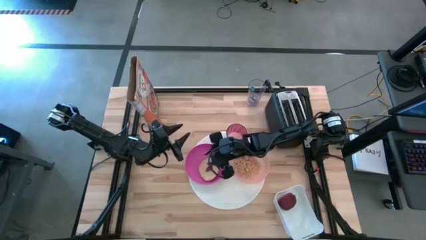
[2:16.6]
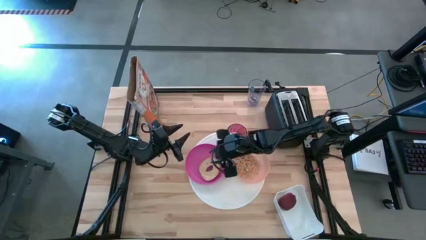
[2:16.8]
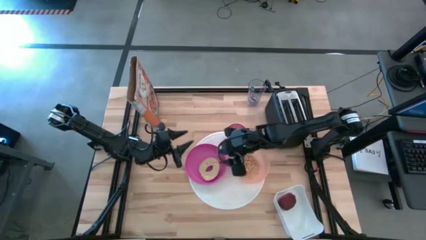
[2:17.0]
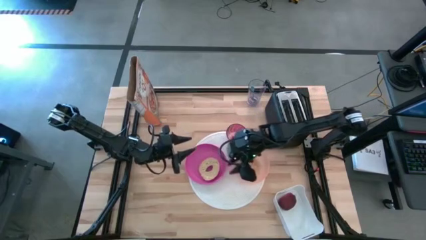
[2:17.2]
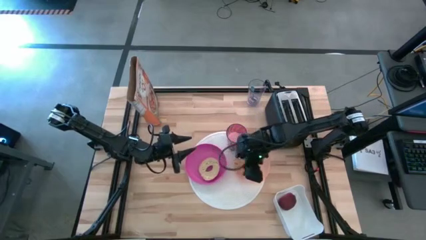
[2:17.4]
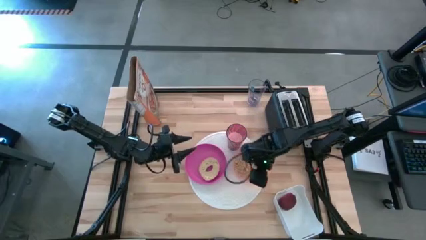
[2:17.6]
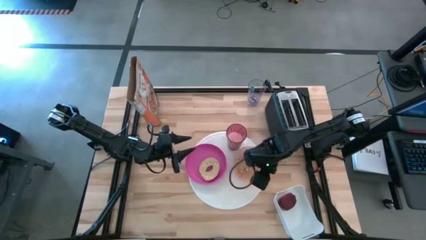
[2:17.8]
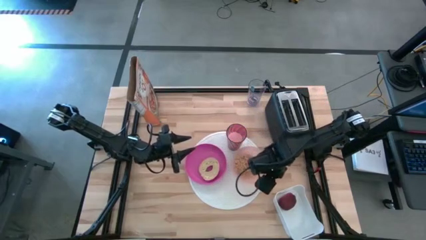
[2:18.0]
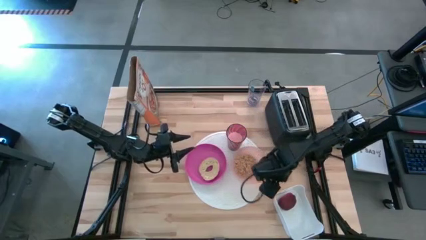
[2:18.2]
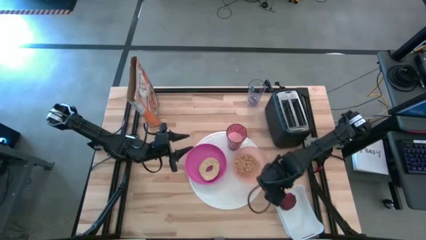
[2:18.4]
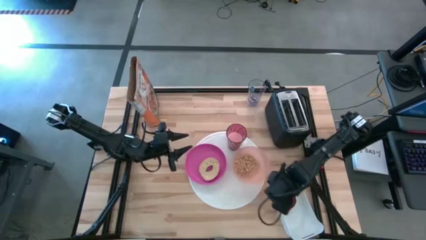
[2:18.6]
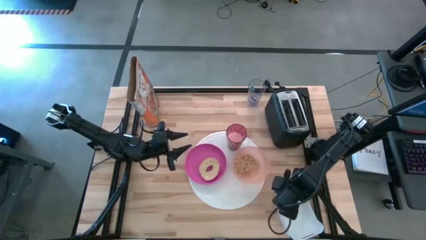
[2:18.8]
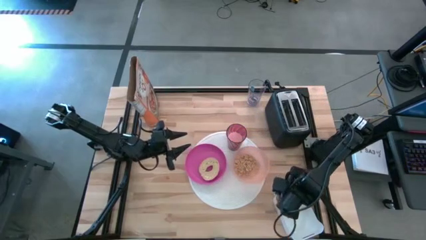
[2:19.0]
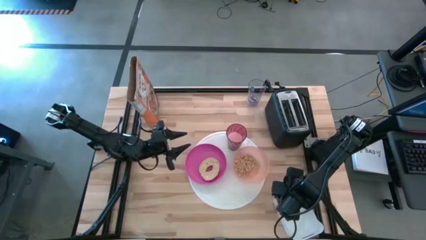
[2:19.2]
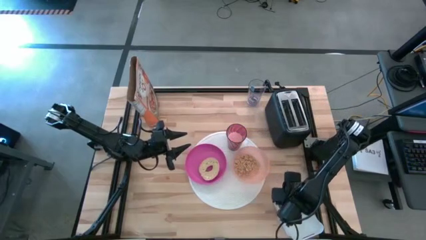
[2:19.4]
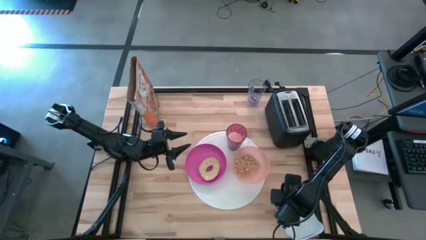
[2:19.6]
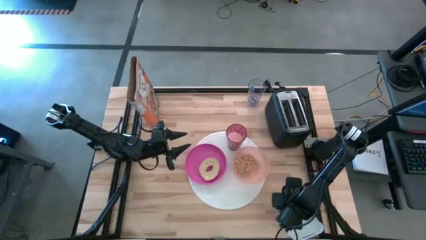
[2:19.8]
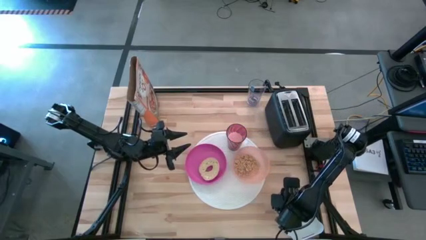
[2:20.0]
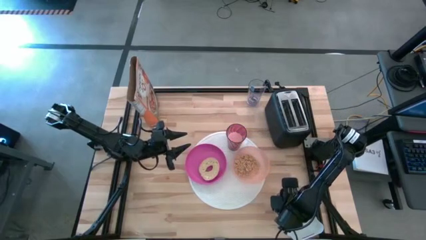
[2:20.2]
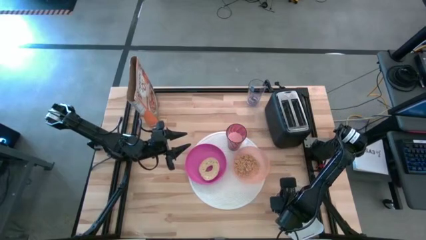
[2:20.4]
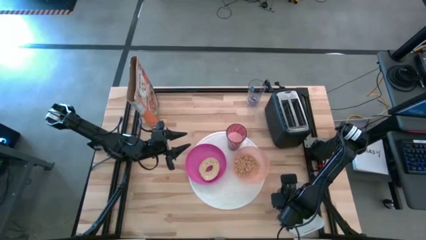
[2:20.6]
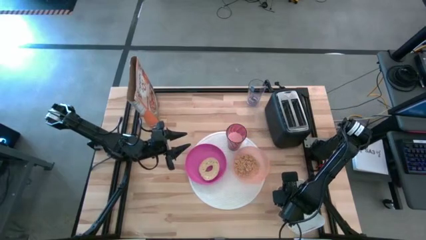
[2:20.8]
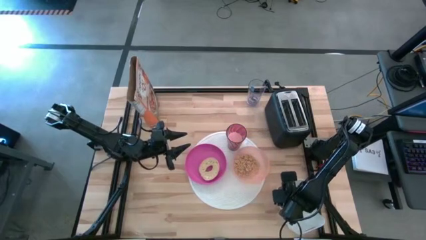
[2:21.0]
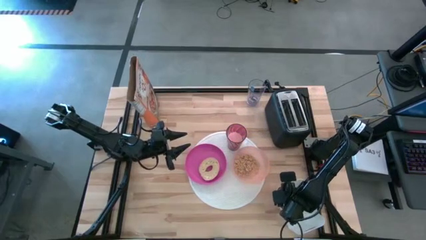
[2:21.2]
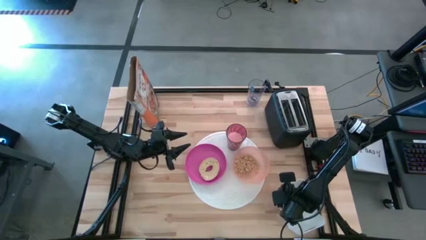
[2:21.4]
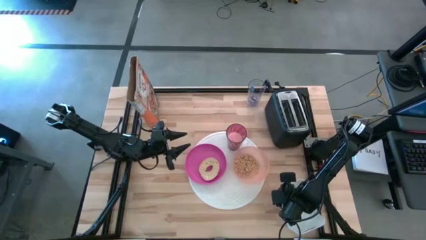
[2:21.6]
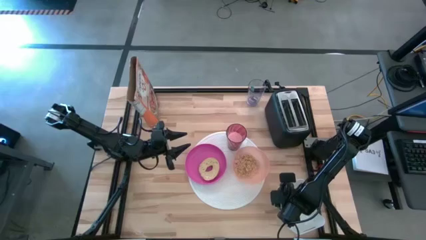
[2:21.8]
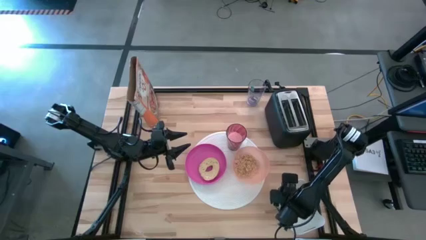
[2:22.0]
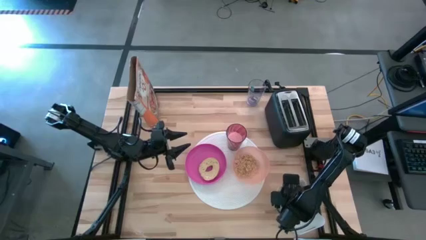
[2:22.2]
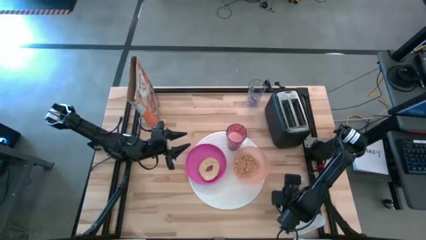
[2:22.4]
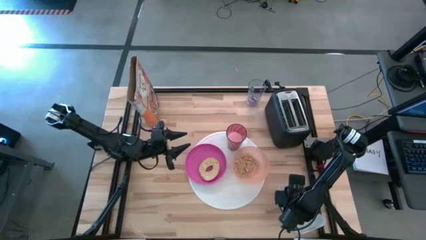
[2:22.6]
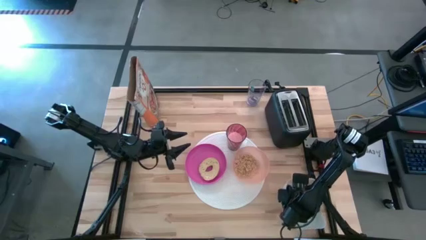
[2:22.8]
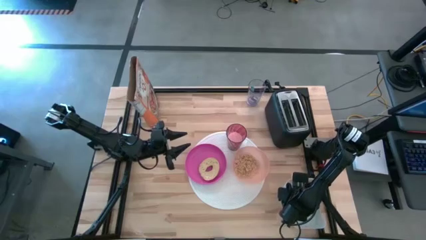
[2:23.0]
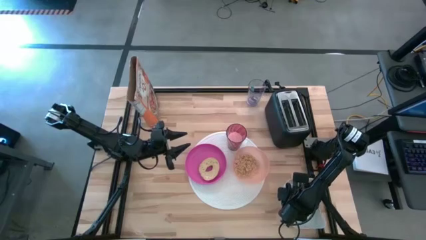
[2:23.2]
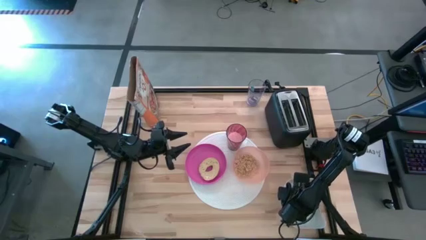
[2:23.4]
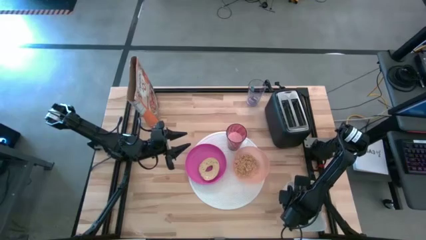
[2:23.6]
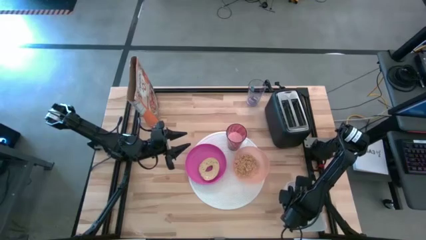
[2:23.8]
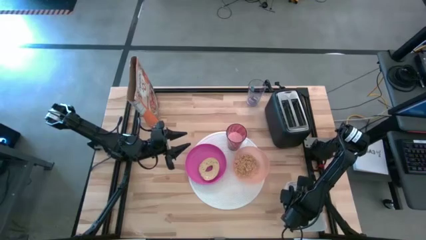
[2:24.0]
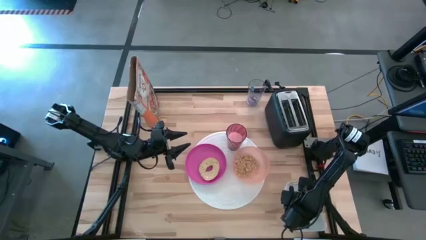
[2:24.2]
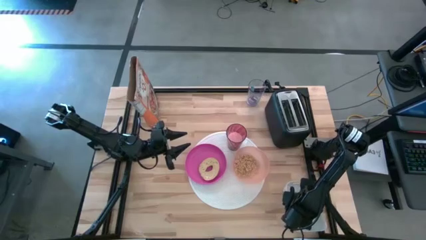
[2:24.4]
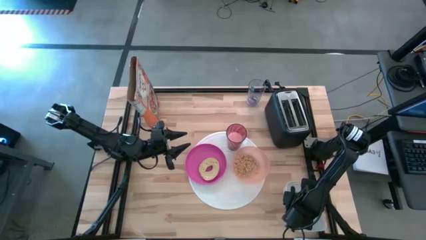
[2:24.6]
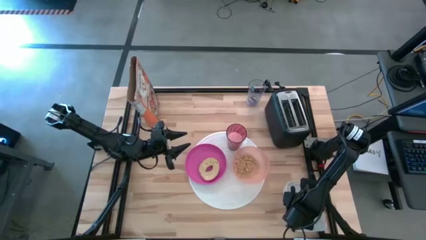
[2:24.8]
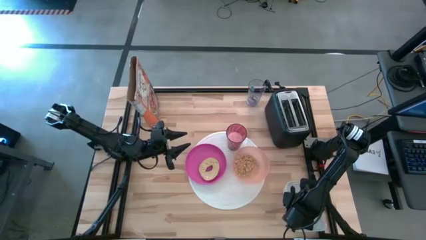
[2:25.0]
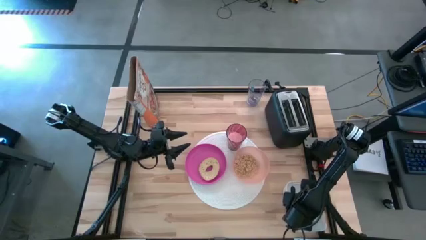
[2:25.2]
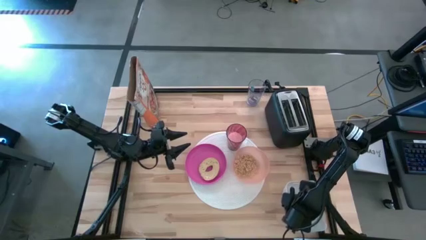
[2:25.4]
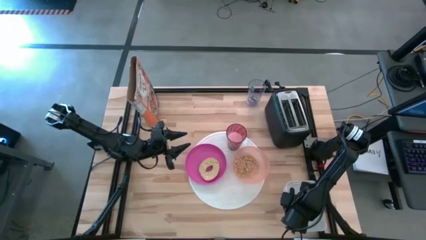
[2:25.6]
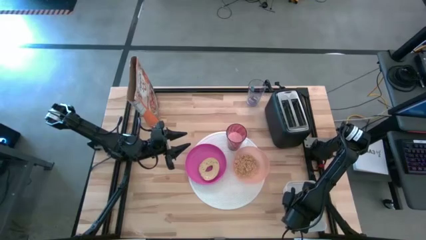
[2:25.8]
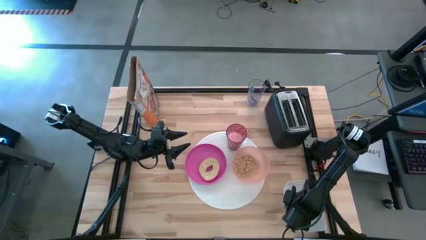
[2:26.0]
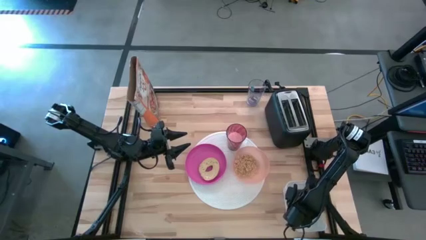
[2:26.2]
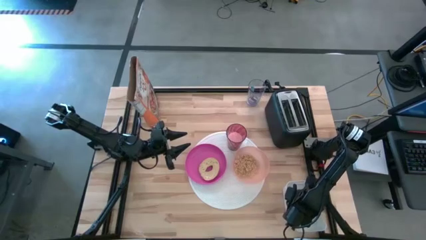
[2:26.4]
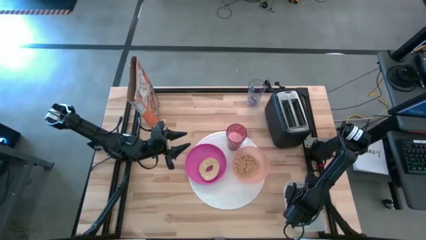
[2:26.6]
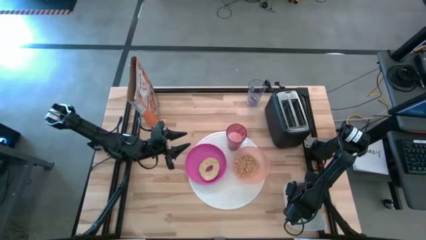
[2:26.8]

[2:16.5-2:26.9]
Task: Arrange a breakfast setting
Put the apple on the white placemat beside the red cup
